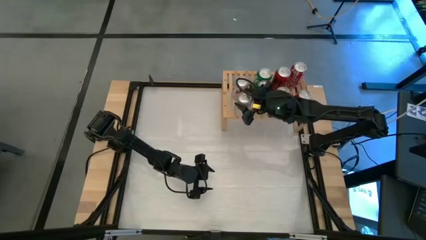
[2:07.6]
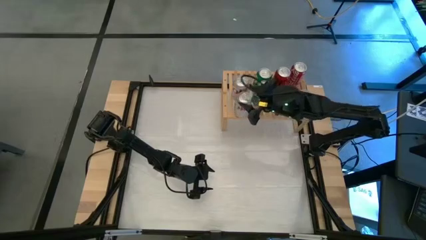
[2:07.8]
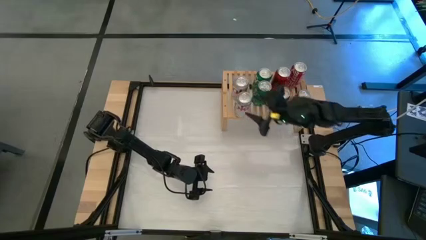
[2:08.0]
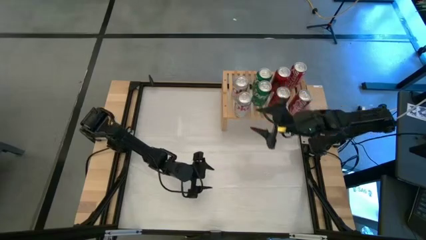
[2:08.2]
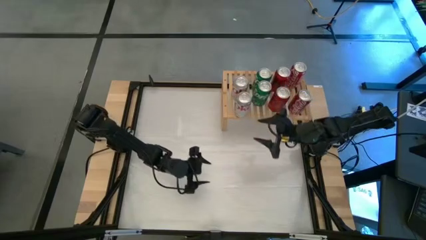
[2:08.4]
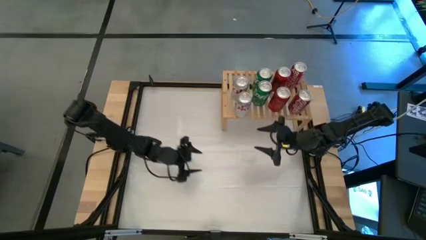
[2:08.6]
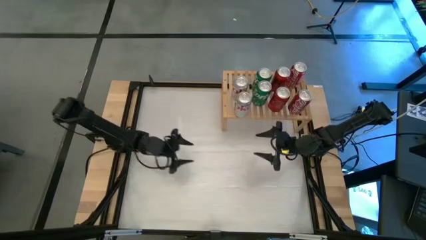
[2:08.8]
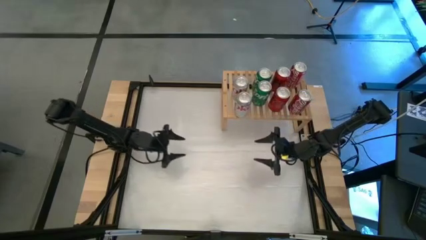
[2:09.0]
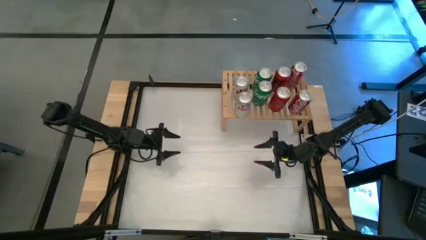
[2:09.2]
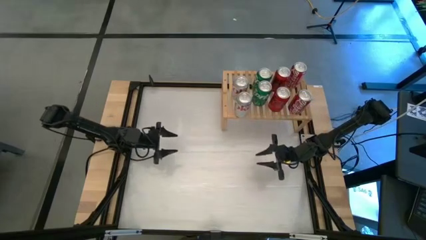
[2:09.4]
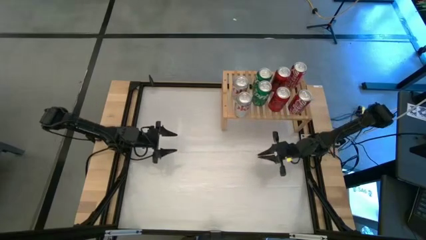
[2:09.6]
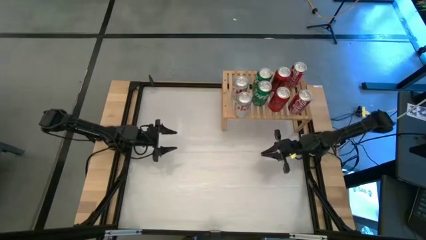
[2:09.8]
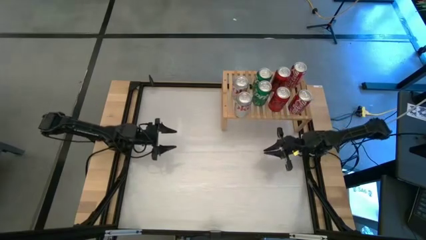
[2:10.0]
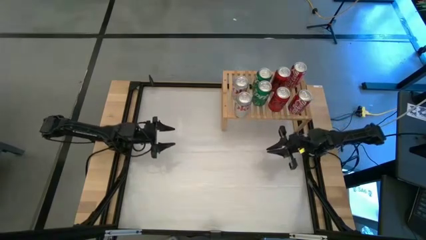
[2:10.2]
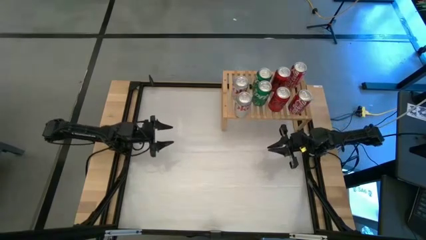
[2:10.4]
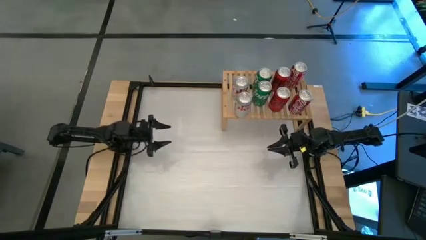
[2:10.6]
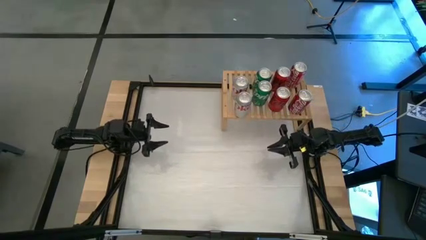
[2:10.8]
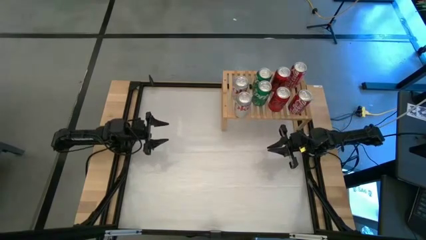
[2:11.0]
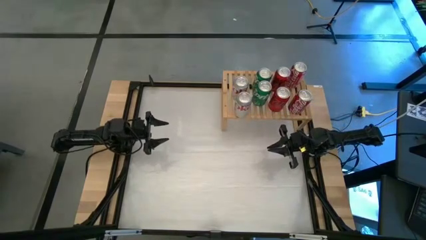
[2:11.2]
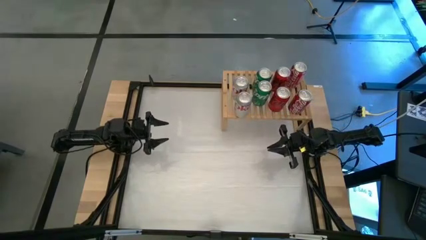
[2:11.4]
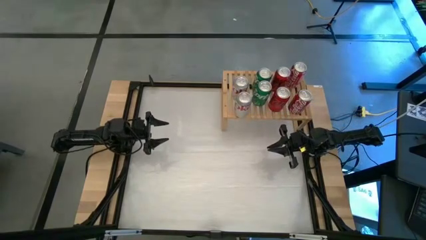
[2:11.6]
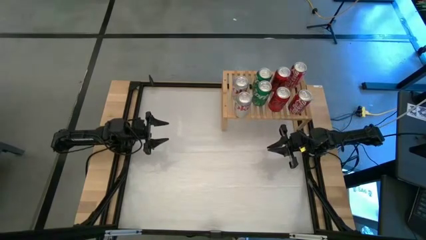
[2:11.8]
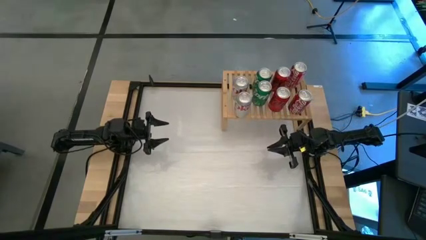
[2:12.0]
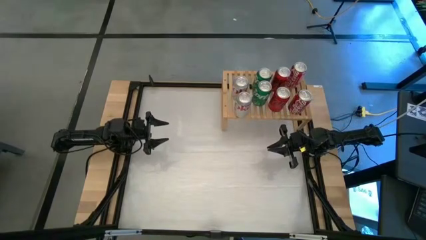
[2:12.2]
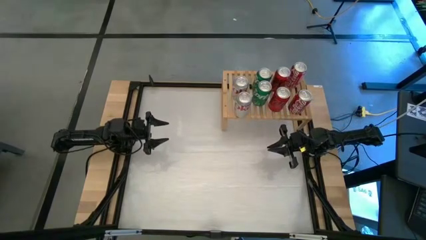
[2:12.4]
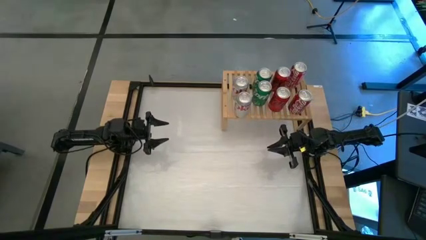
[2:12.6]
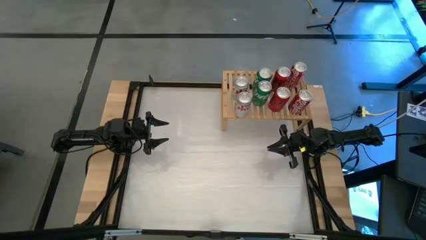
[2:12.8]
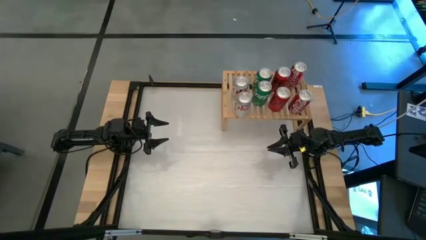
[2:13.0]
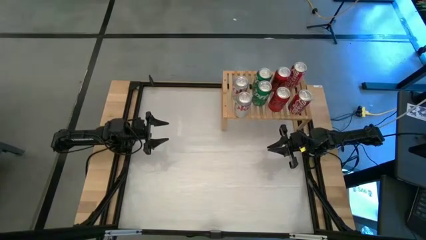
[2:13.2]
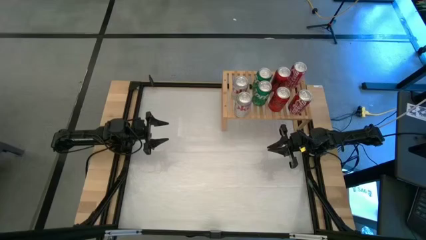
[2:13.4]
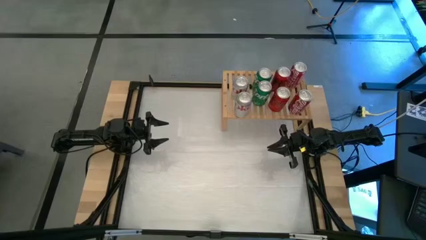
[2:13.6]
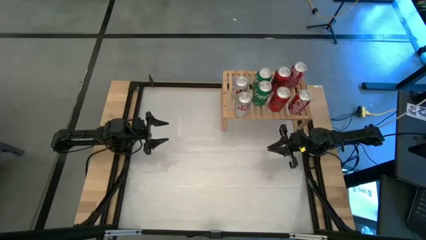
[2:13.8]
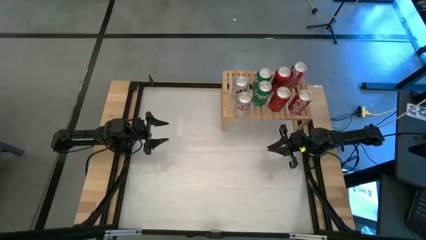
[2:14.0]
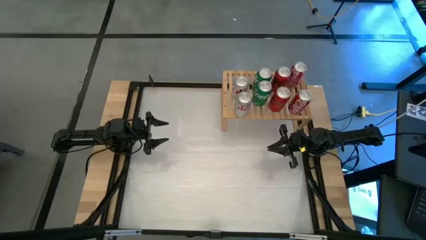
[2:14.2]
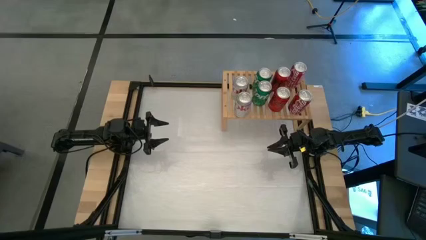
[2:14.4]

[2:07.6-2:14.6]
Task: Place canned beverage on shelf
Return to Home Position

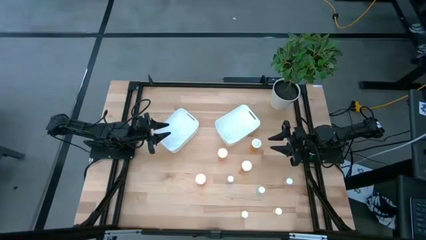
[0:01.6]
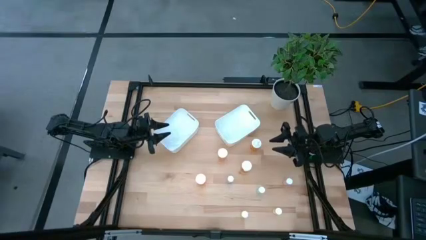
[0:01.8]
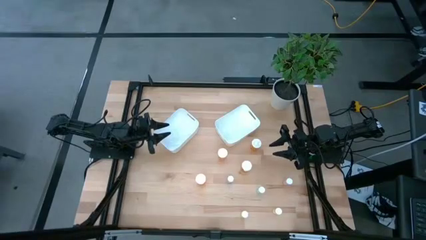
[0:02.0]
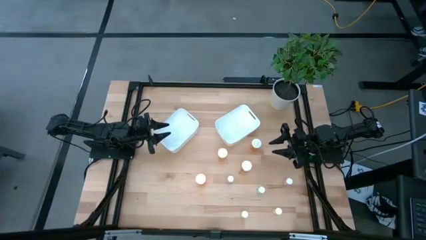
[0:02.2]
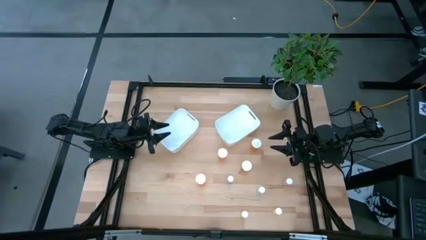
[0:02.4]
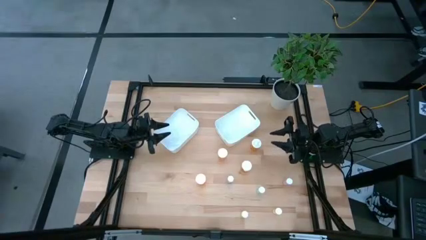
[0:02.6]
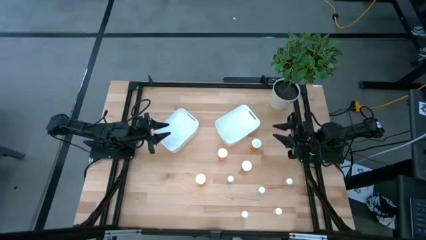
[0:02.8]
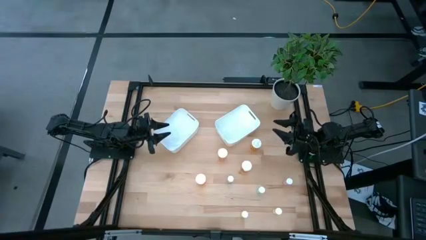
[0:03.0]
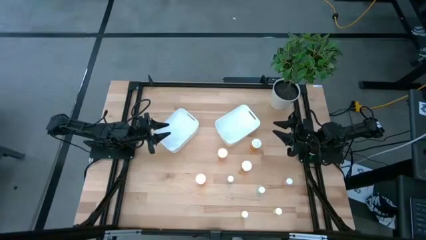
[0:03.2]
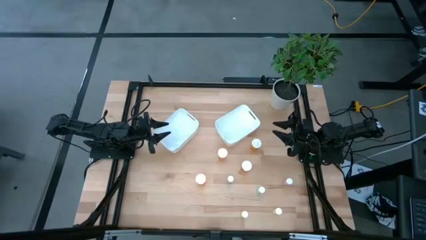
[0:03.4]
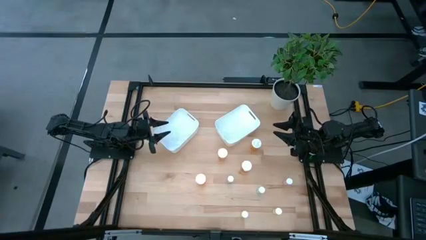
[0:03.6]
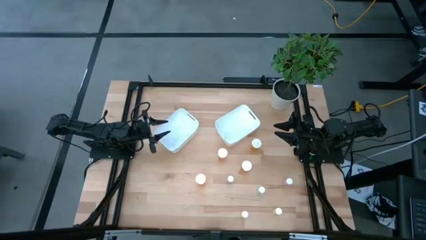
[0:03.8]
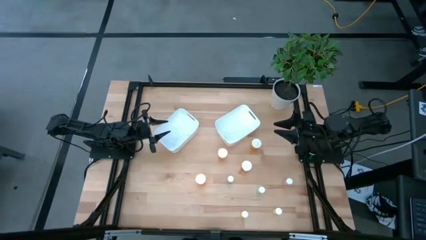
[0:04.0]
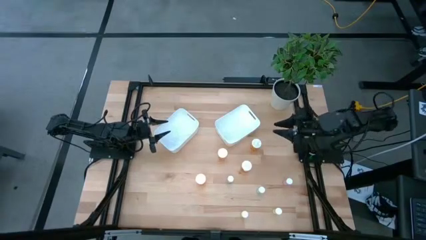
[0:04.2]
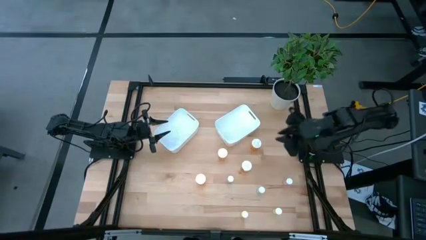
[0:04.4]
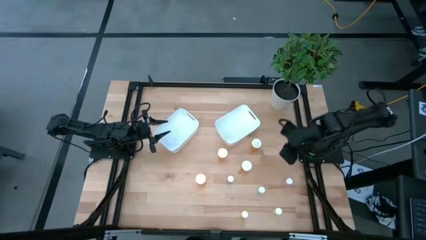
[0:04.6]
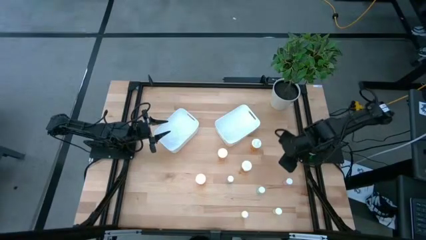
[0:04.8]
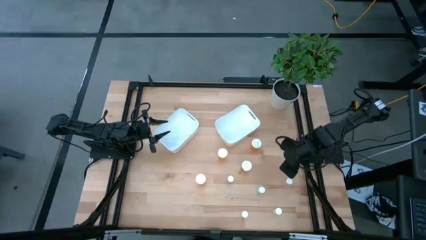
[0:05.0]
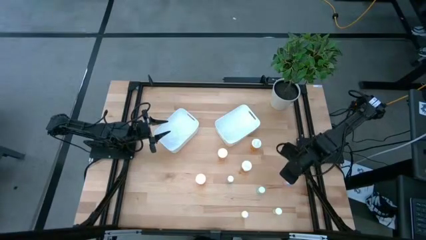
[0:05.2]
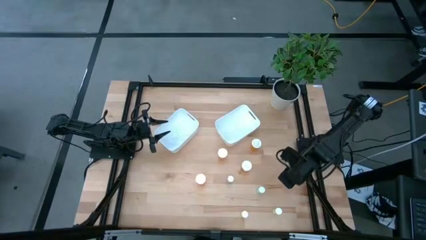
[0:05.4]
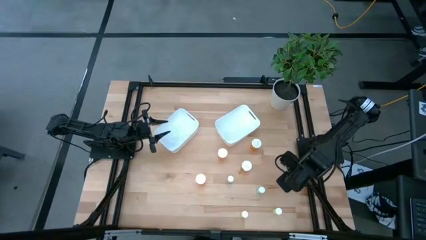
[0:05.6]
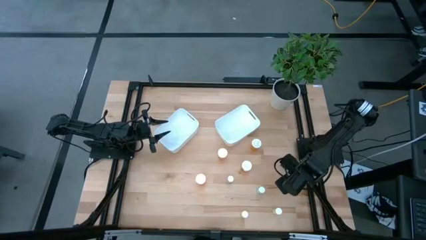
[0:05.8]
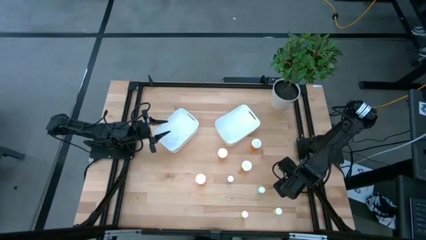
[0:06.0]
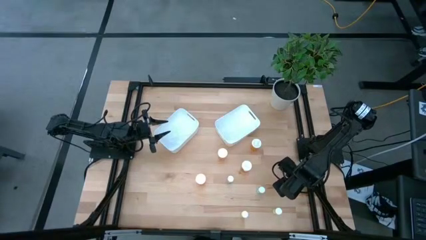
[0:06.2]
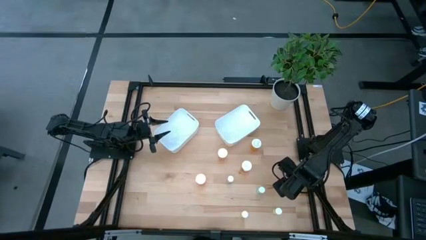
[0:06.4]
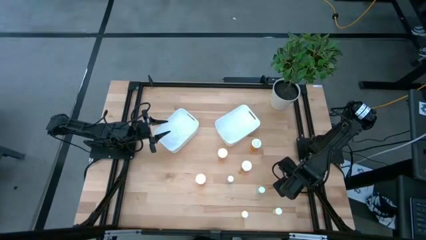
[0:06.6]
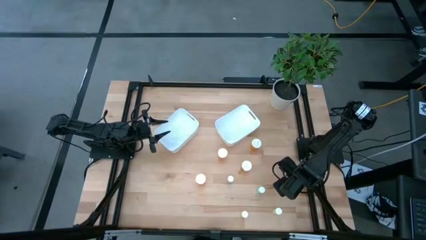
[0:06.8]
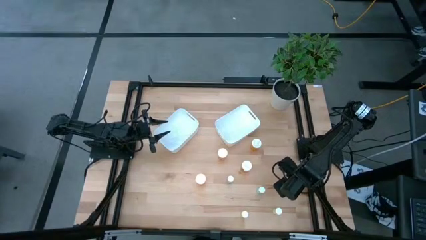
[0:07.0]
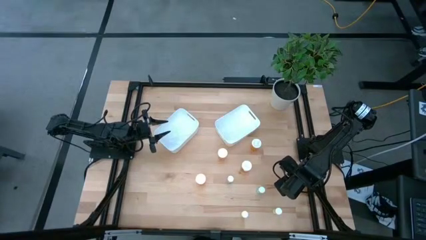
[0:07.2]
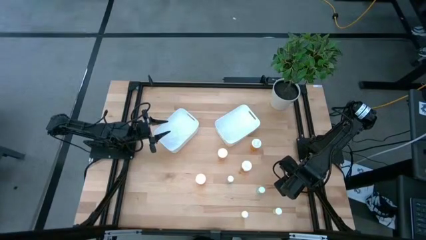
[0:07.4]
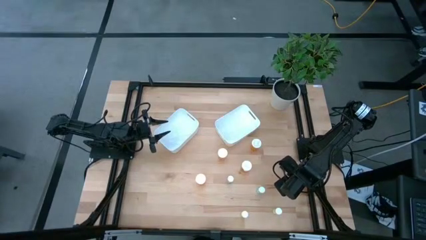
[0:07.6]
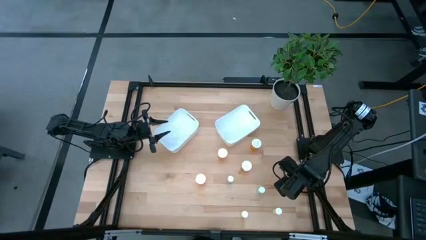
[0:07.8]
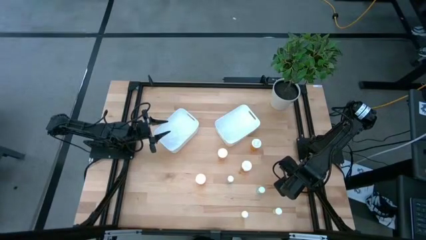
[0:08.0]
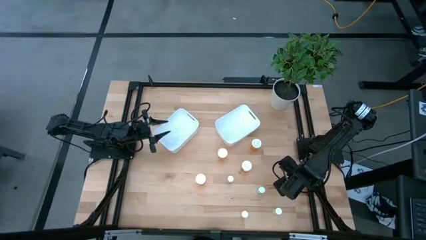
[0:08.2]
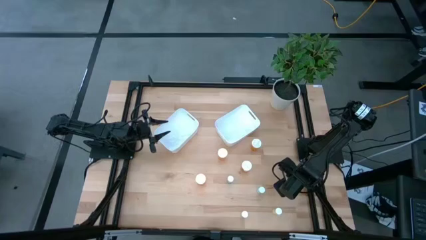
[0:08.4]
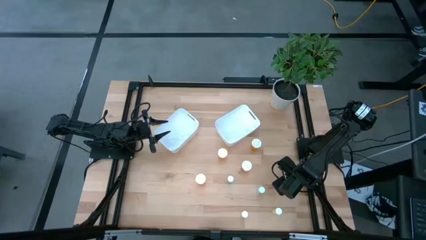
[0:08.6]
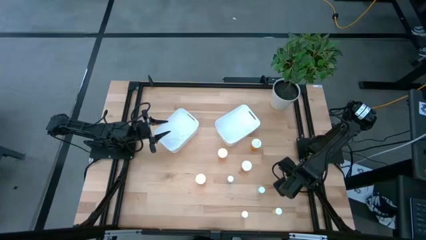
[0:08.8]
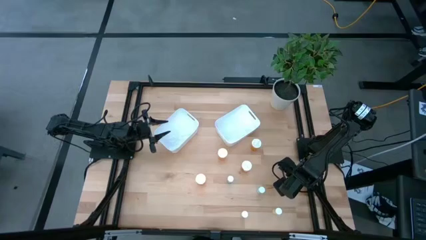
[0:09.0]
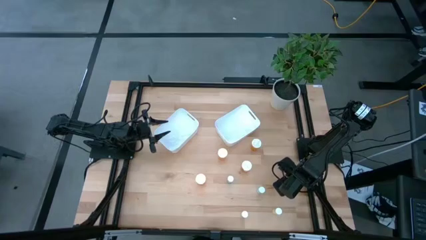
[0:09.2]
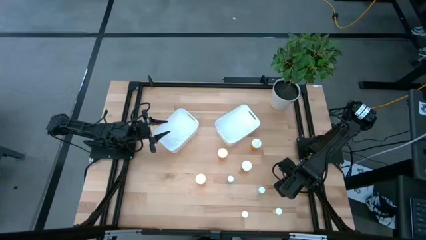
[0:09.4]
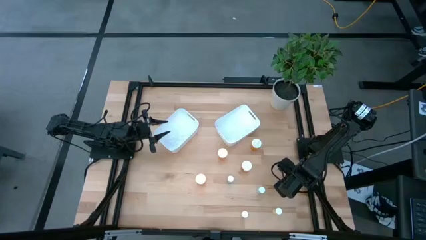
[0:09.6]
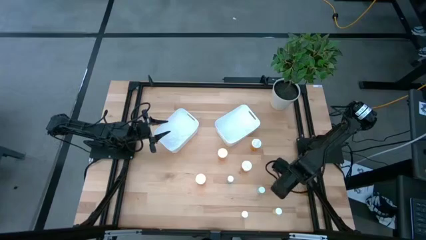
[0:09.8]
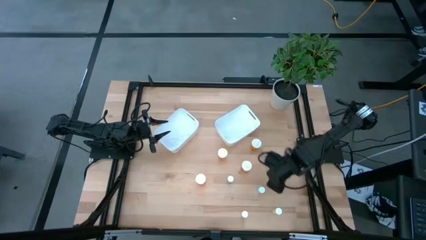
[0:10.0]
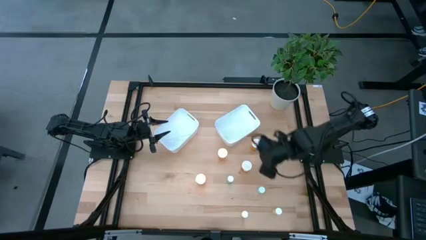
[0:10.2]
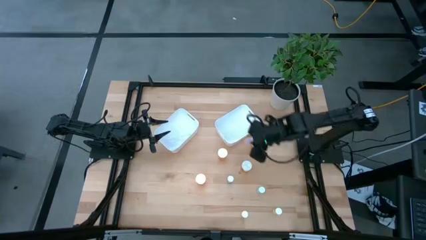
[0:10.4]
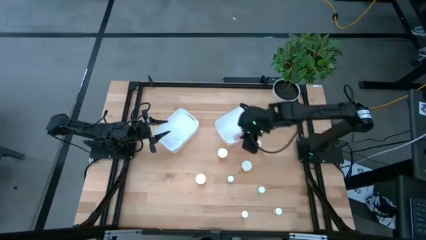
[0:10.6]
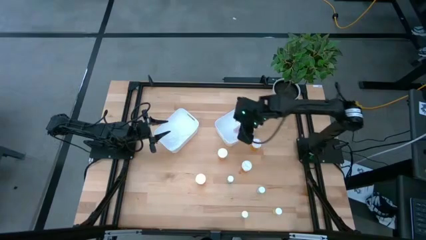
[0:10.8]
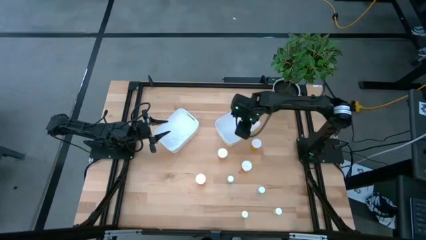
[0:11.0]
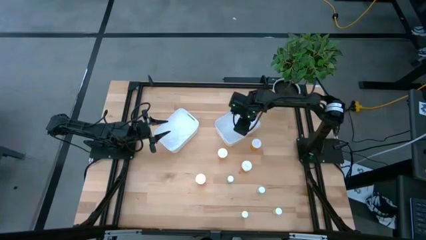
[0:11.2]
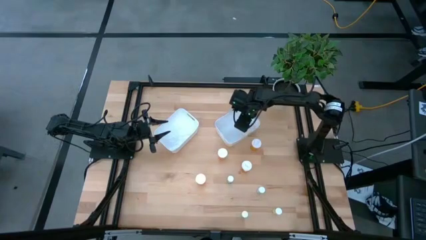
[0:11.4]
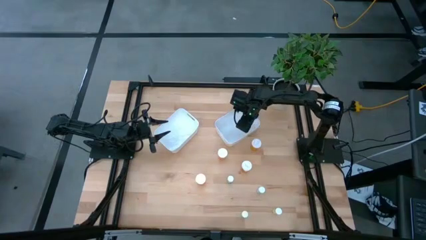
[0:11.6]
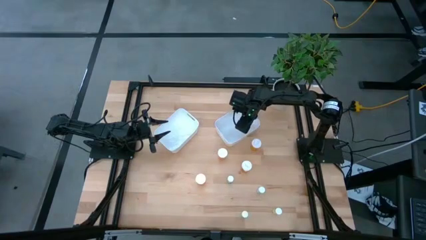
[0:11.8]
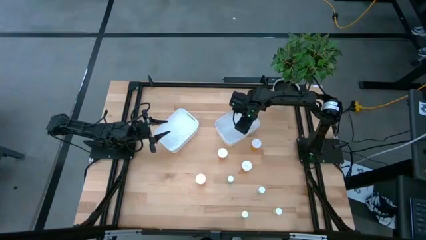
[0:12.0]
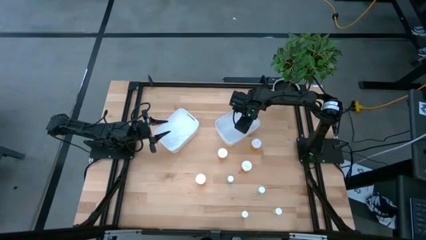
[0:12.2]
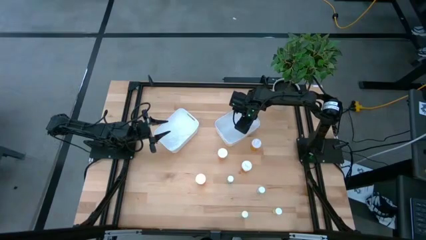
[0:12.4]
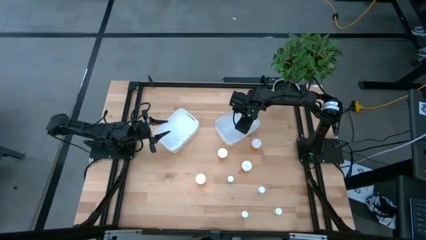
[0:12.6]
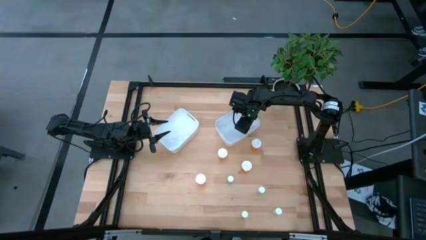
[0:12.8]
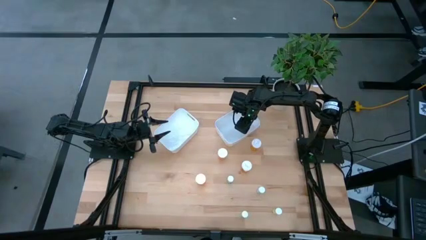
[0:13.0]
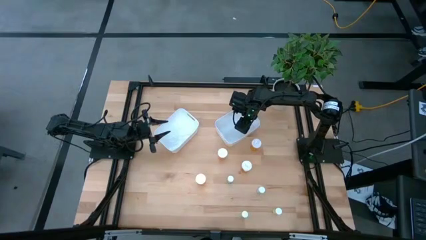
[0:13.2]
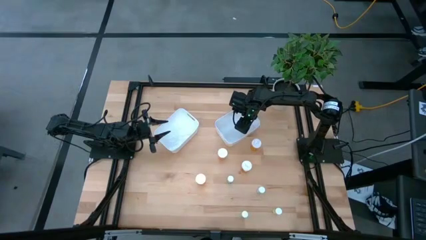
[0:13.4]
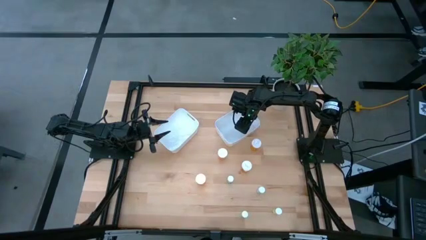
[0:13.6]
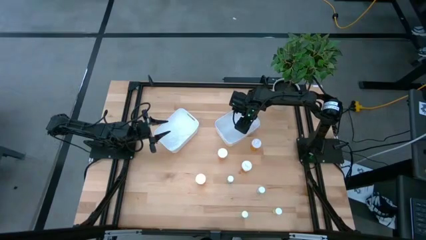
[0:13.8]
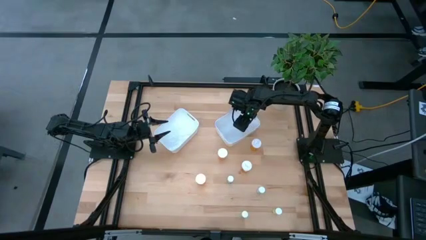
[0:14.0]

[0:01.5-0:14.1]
Task: Pick and place medicine bottles into bin by pill shape (circle, oval)
Put the pink tablet bottle into the right white bin
